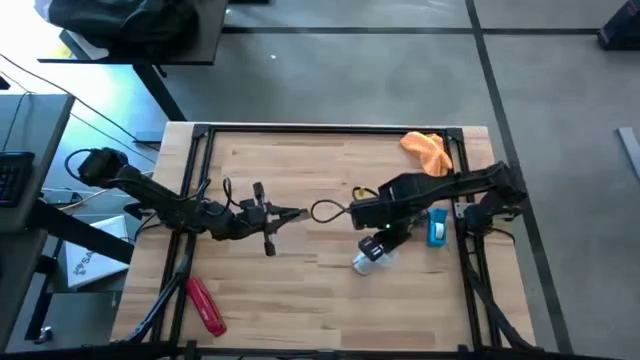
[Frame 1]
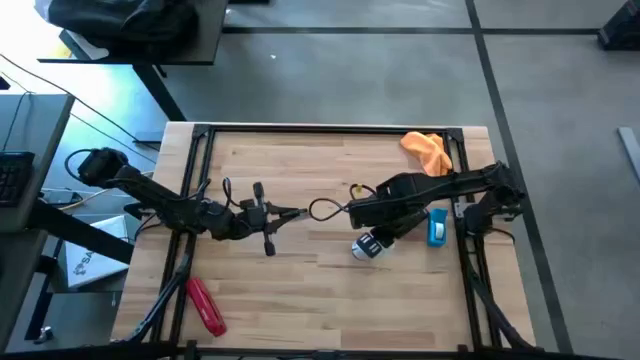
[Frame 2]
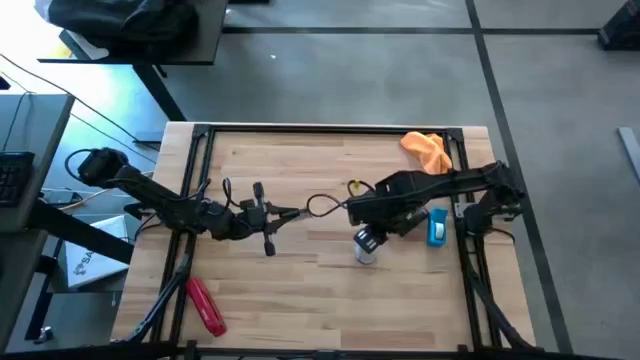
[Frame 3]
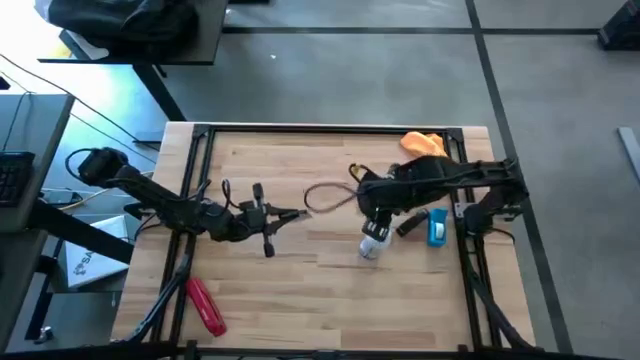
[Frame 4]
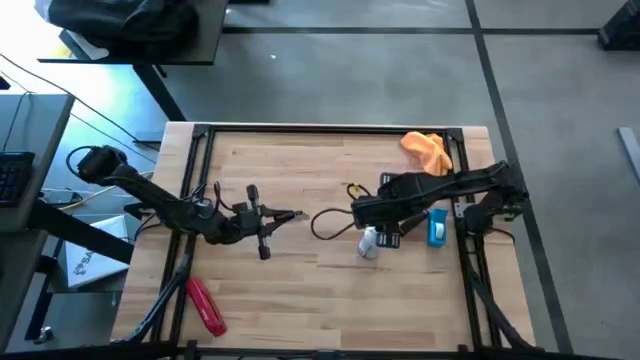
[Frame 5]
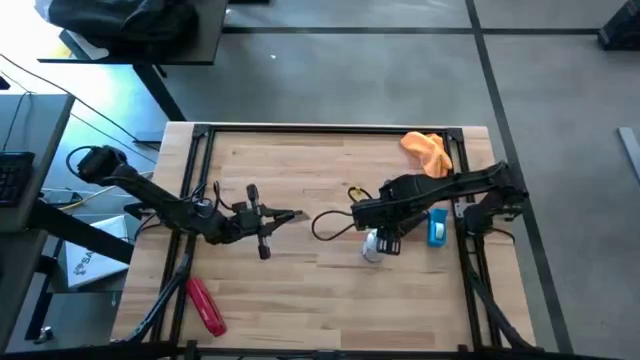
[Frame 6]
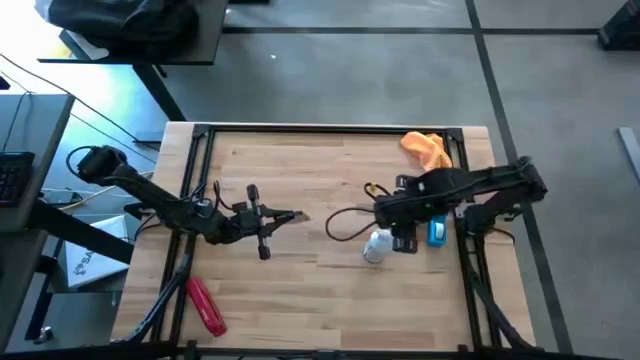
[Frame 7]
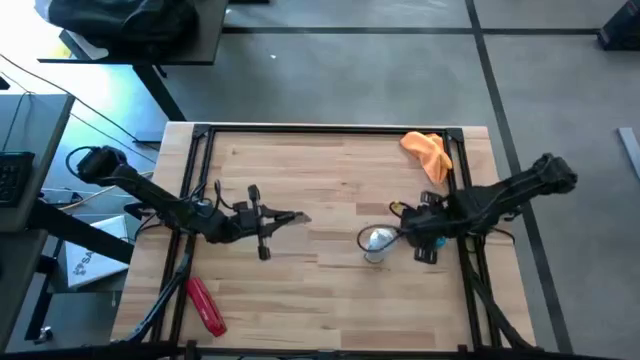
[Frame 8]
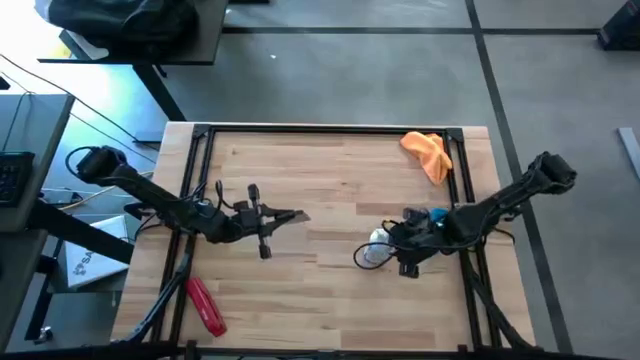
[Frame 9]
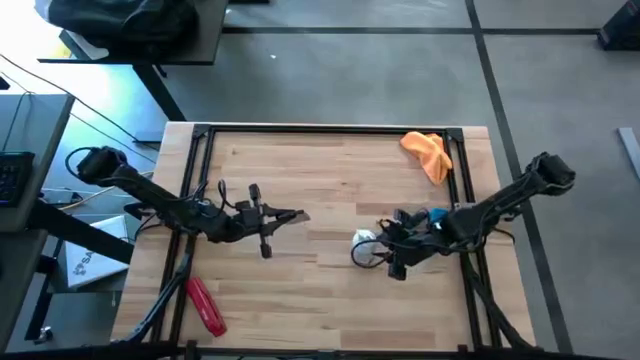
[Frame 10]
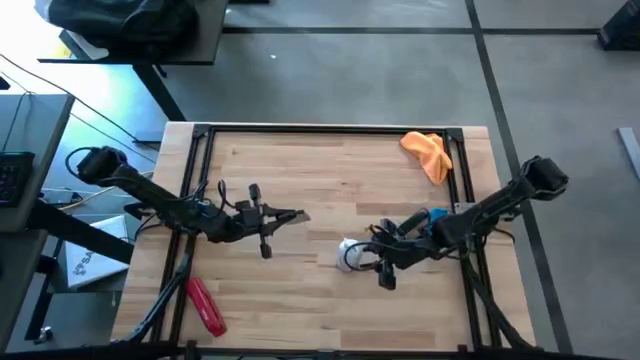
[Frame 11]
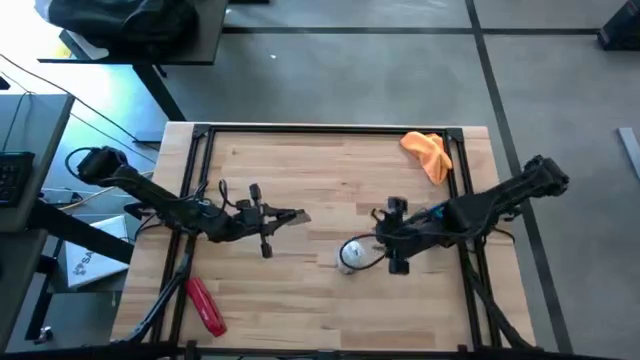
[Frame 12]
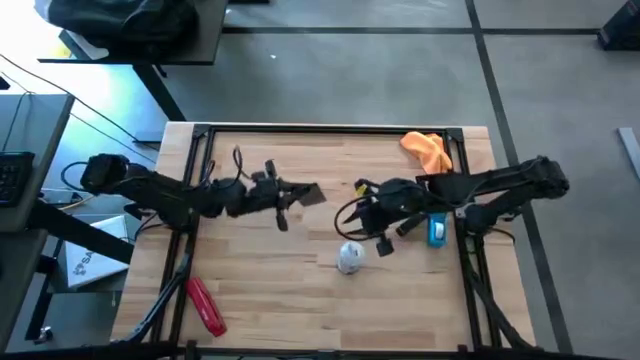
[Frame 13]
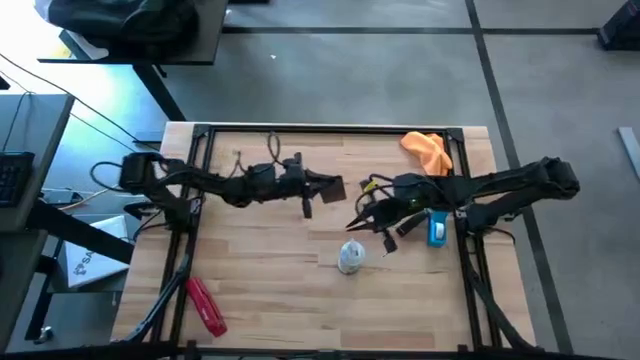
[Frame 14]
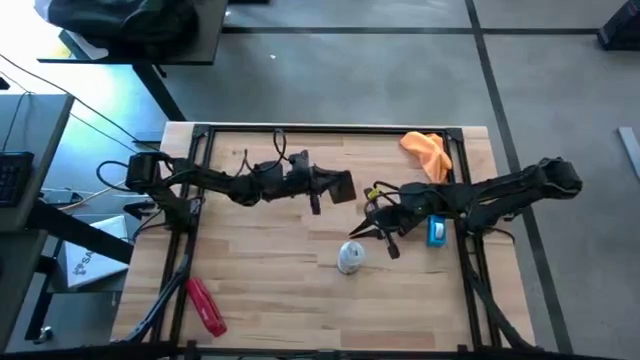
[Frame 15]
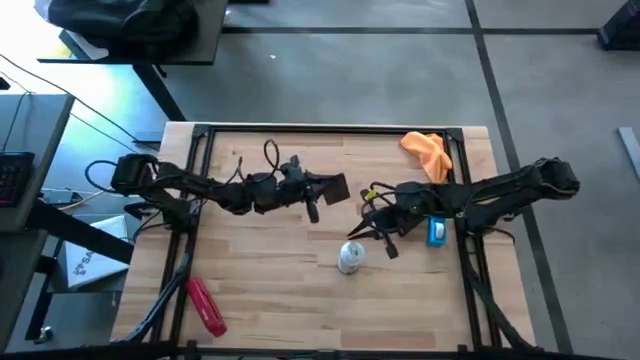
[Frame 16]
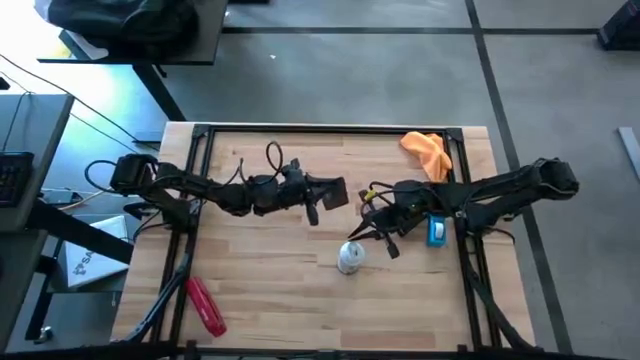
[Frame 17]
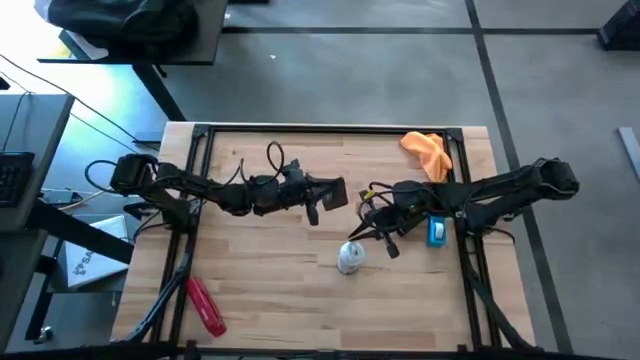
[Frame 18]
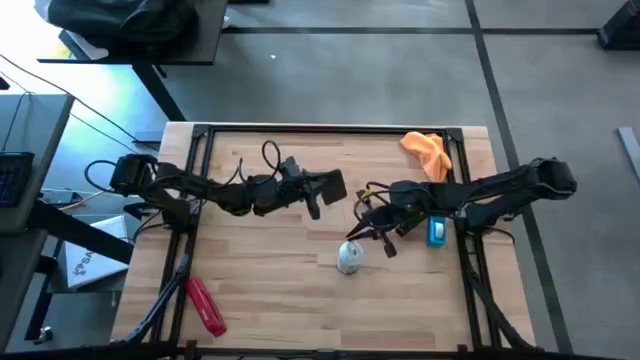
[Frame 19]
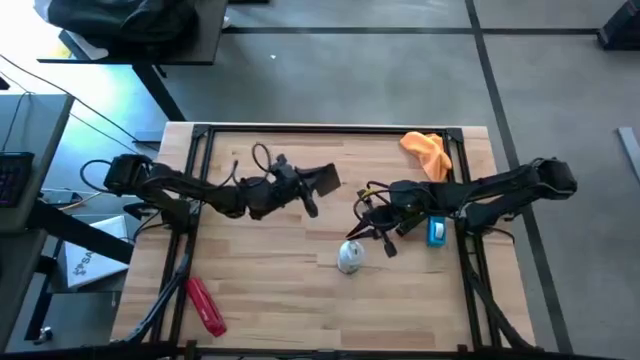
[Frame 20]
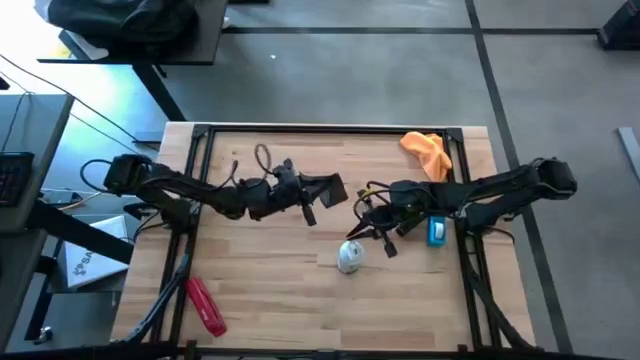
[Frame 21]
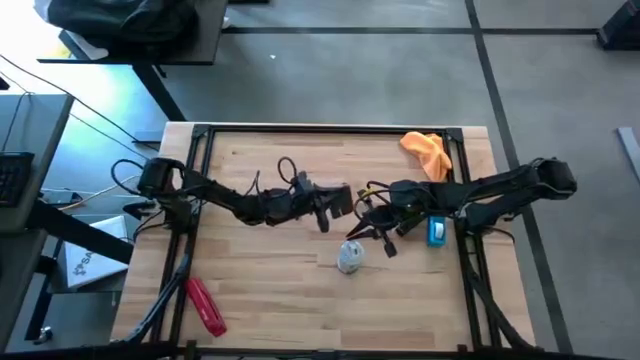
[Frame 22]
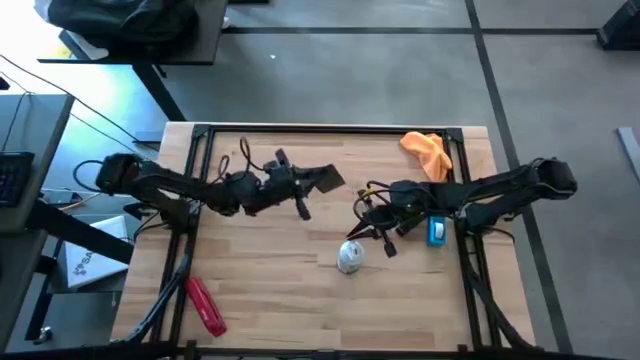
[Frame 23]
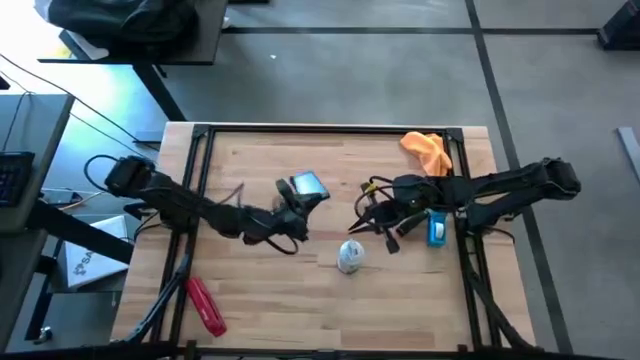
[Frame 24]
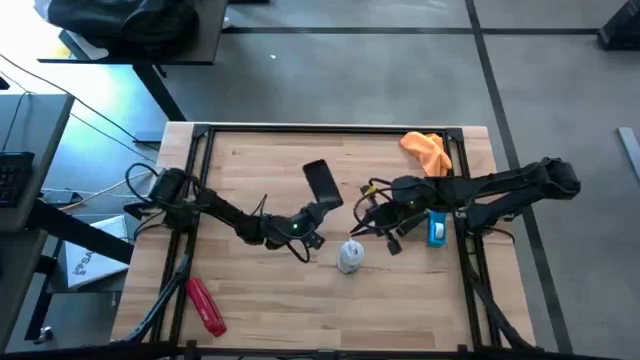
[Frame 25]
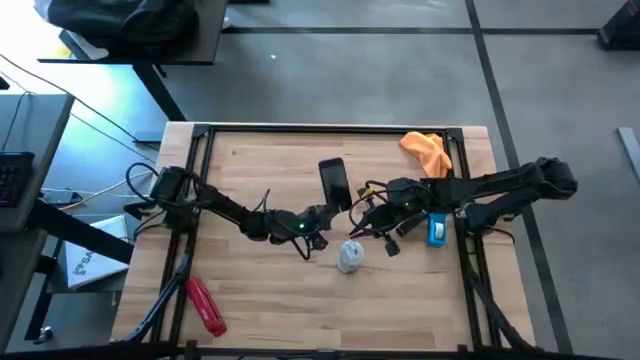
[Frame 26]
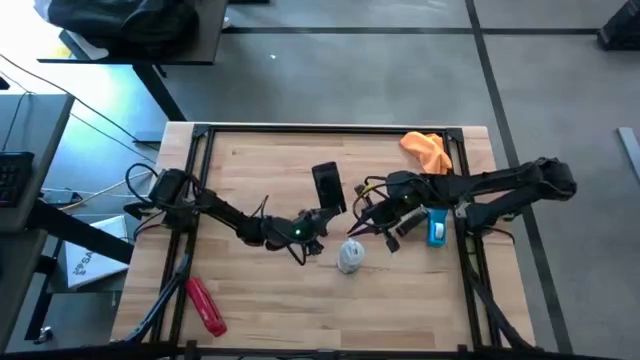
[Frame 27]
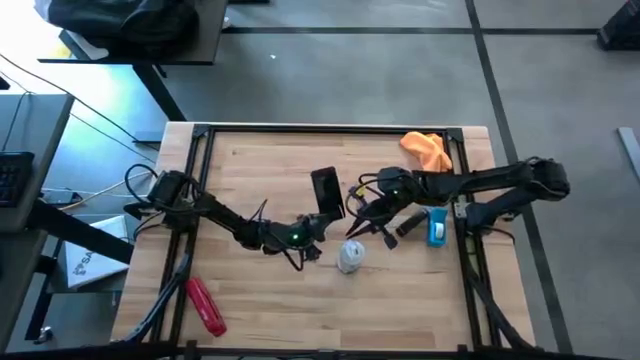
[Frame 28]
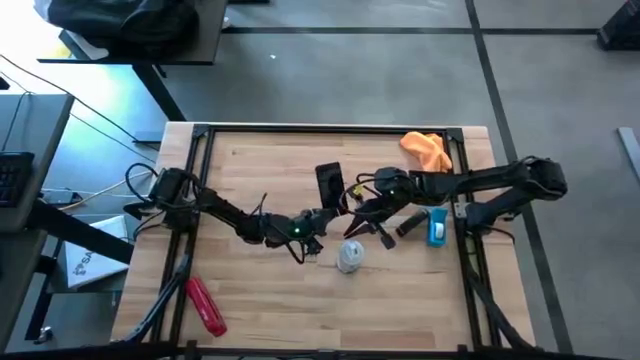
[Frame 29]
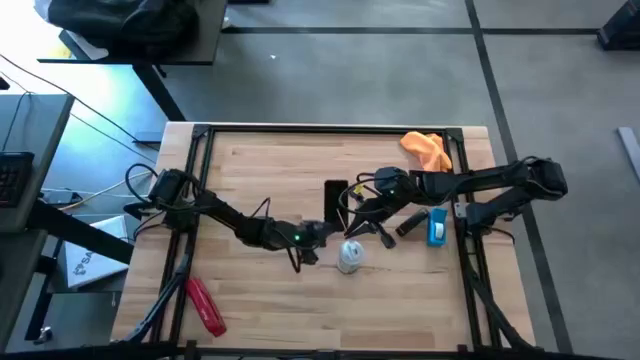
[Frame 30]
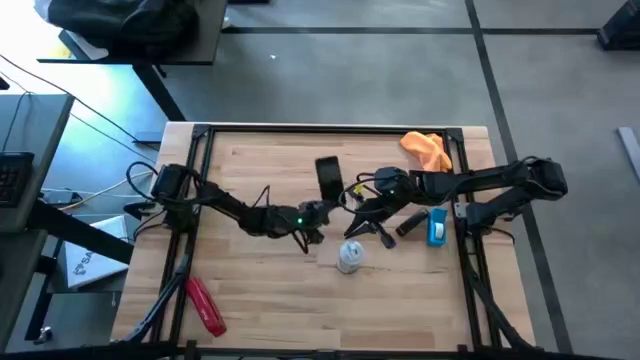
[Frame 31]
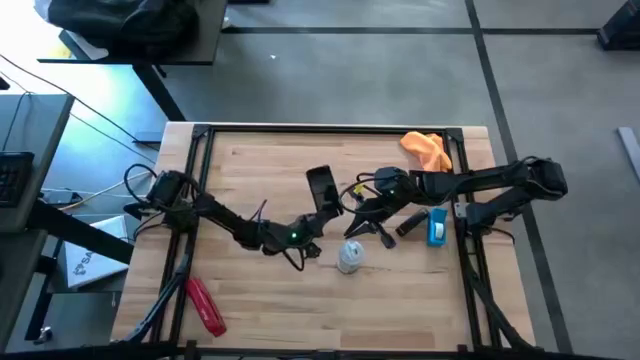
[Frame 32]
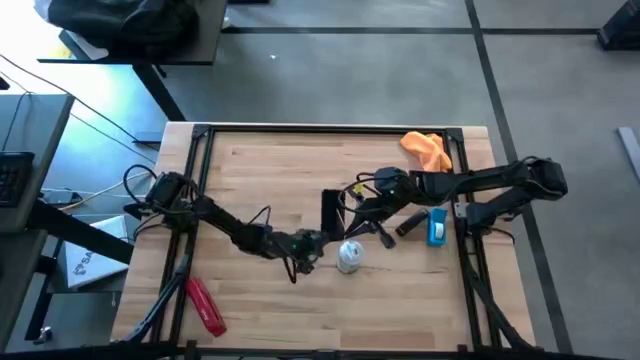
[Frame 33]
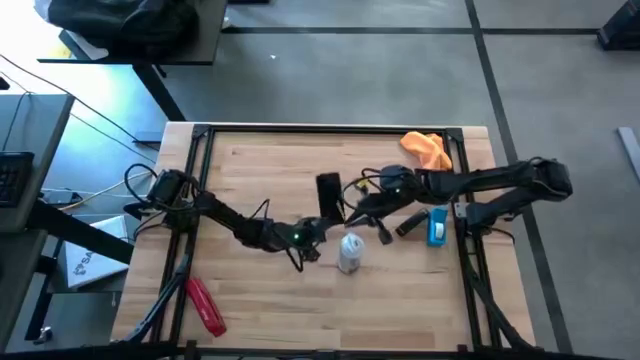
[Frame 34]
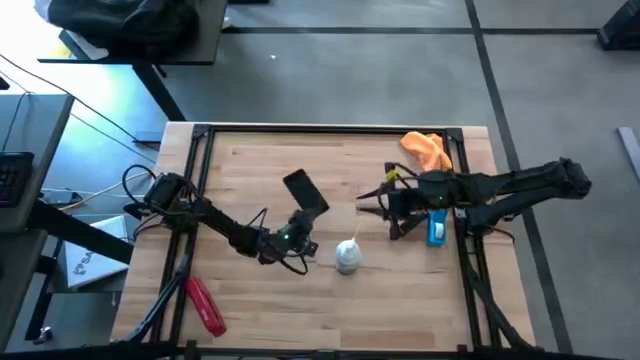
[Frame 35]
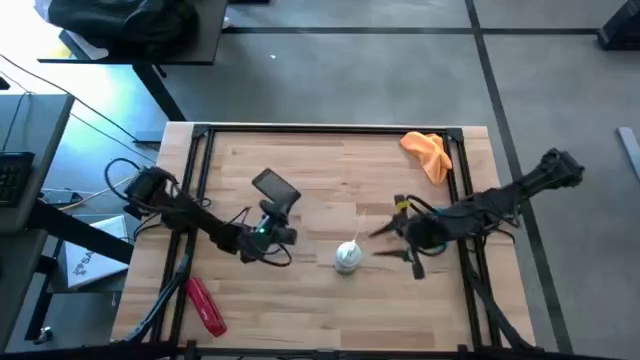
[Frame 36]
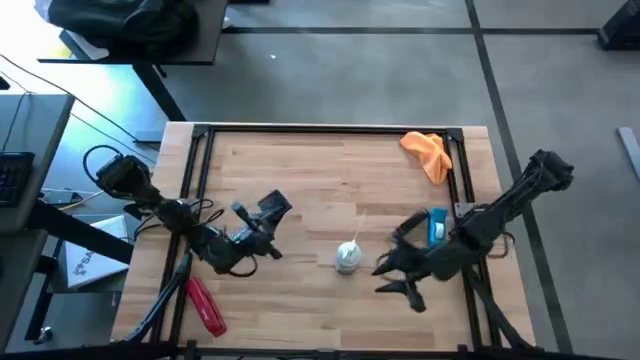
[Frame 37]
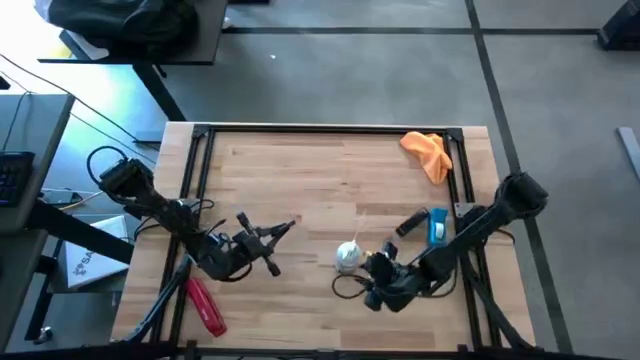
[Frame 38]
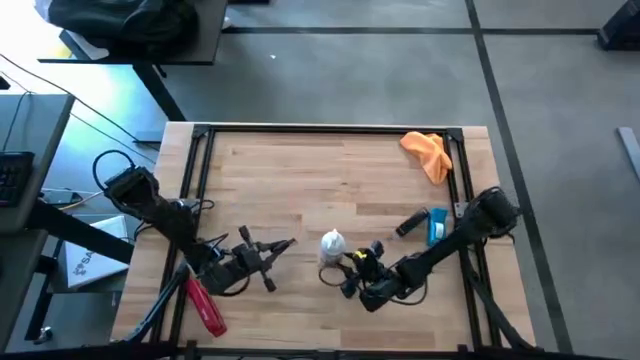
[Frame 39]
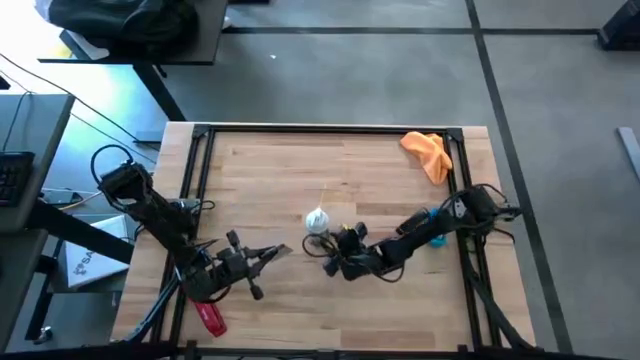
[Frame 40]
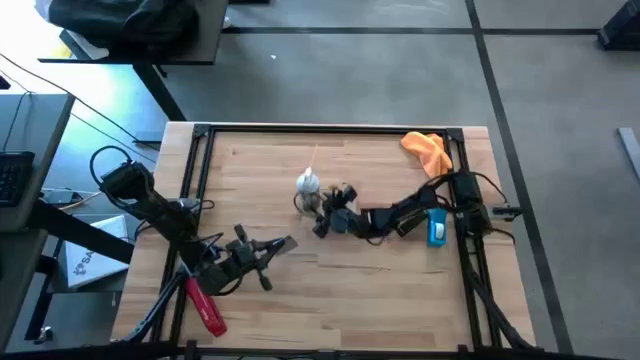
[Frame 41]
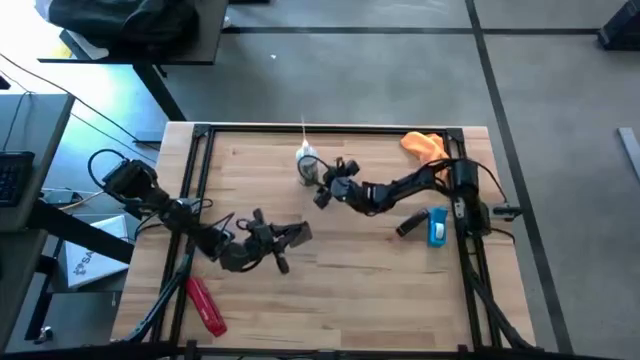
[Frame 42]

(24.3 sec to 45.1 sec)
Task: Apply microfiber cloth
Spray the cellphone using the spray bottle
